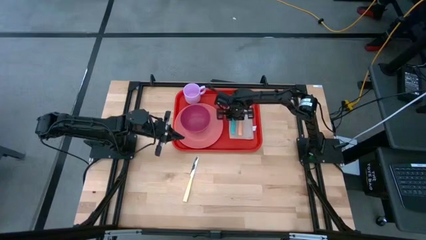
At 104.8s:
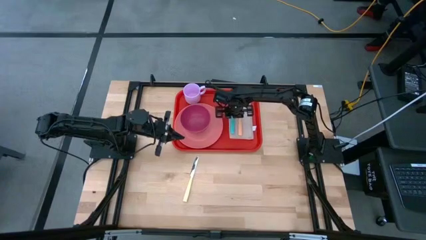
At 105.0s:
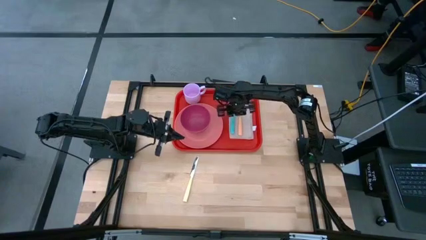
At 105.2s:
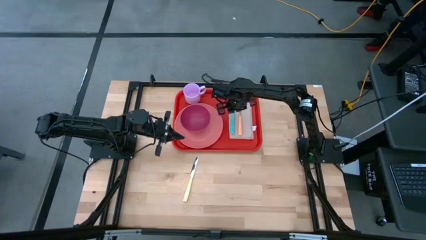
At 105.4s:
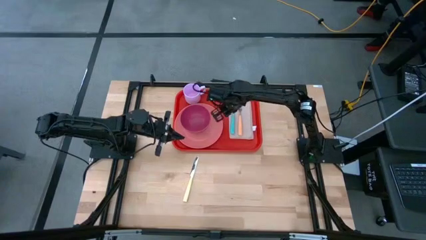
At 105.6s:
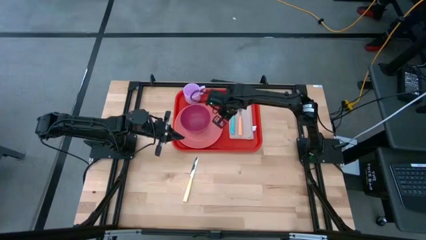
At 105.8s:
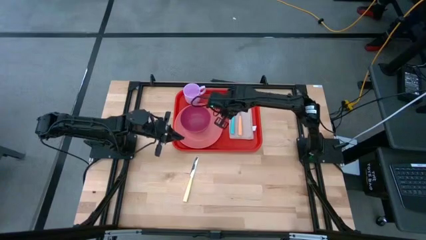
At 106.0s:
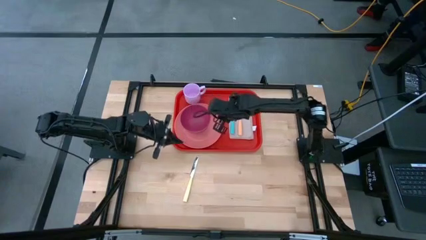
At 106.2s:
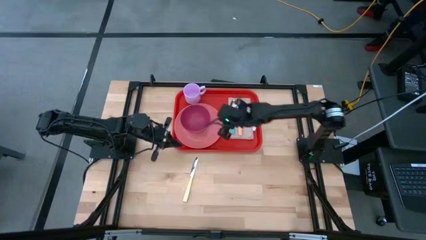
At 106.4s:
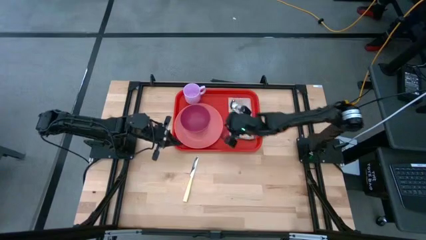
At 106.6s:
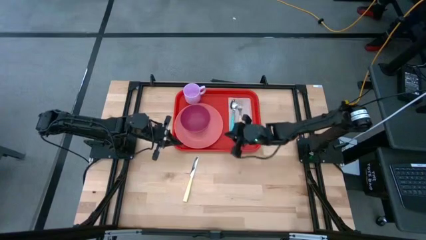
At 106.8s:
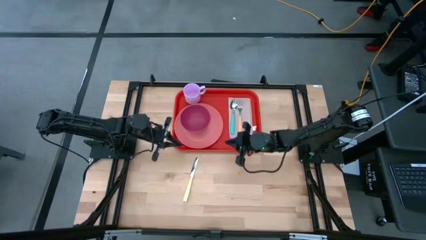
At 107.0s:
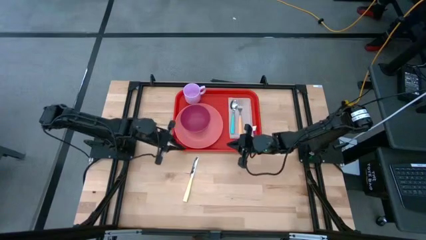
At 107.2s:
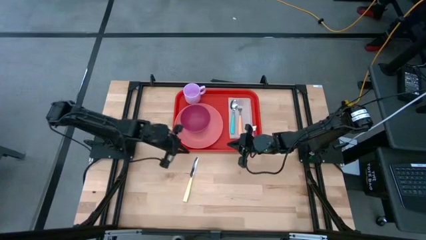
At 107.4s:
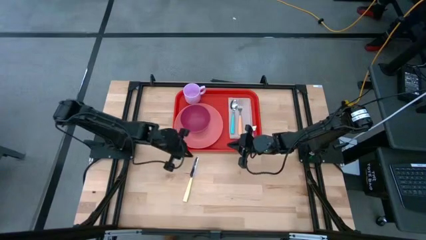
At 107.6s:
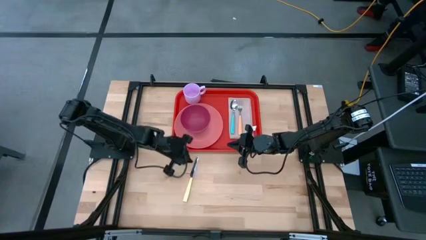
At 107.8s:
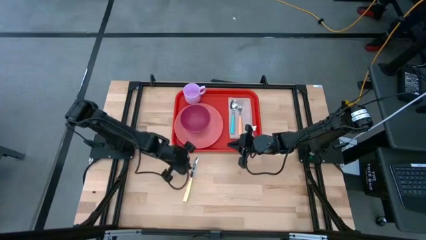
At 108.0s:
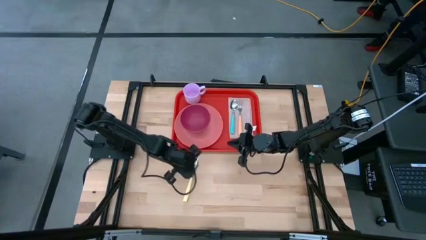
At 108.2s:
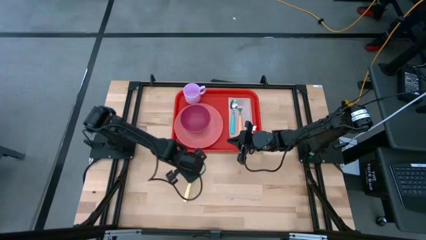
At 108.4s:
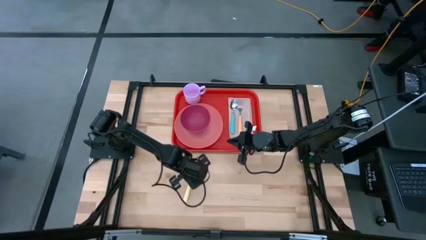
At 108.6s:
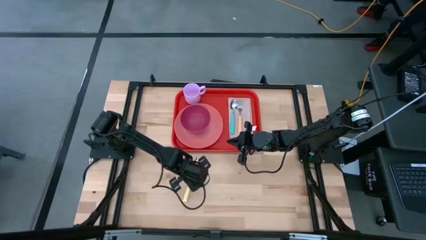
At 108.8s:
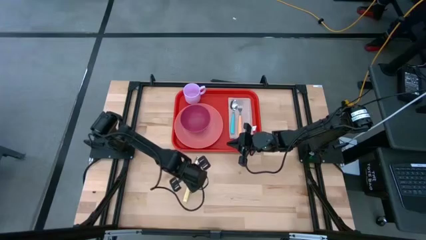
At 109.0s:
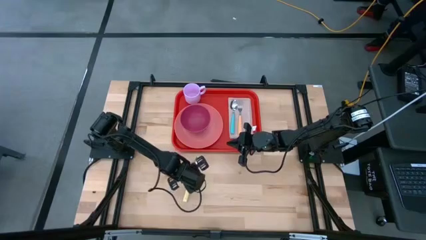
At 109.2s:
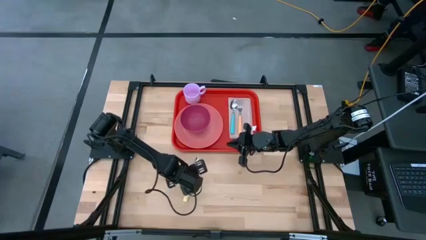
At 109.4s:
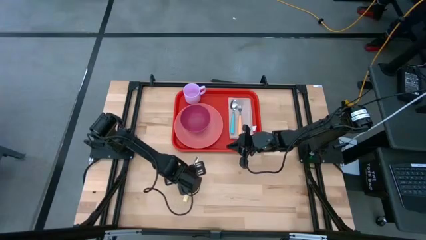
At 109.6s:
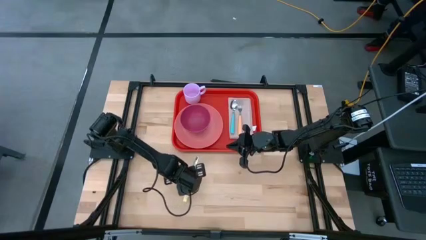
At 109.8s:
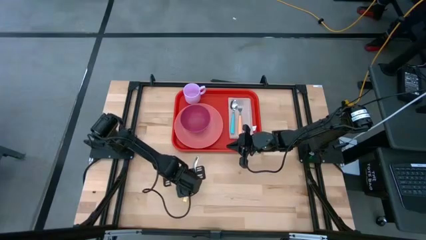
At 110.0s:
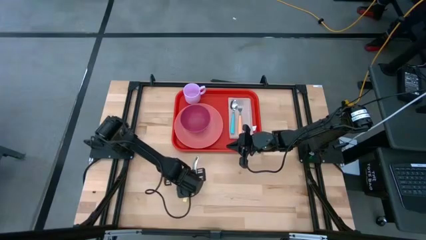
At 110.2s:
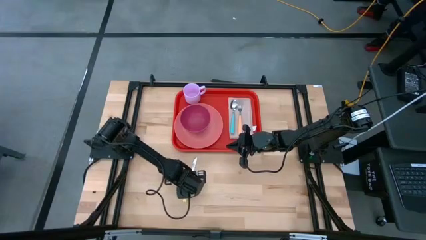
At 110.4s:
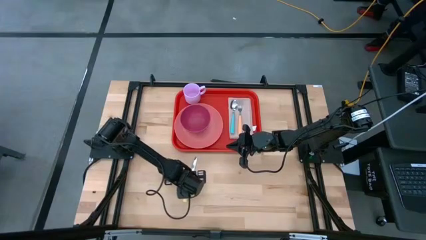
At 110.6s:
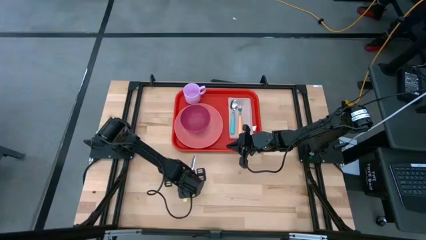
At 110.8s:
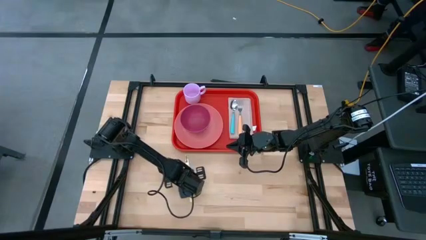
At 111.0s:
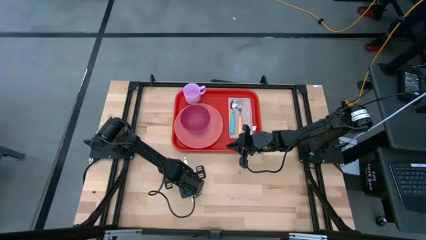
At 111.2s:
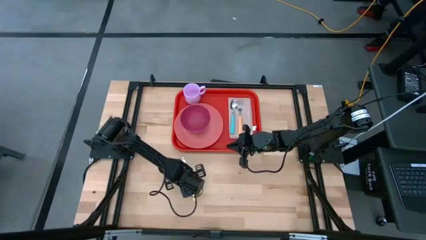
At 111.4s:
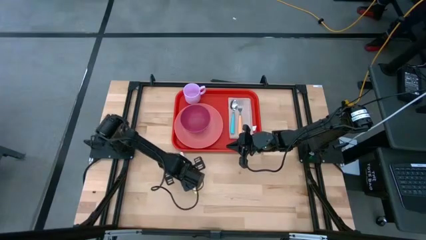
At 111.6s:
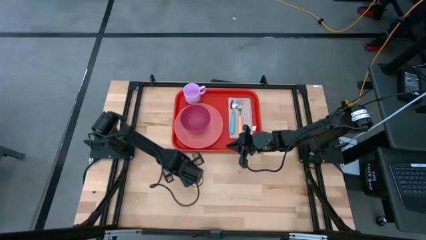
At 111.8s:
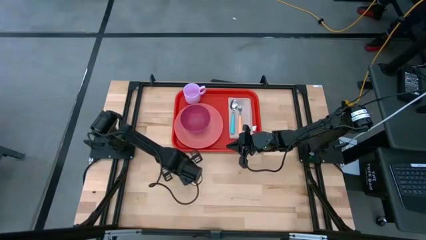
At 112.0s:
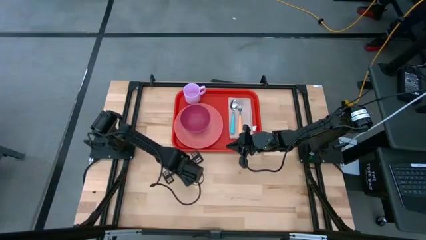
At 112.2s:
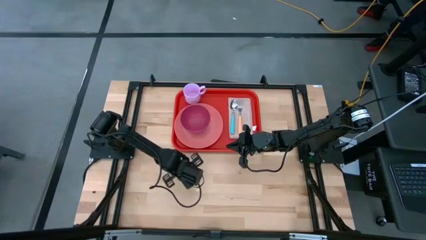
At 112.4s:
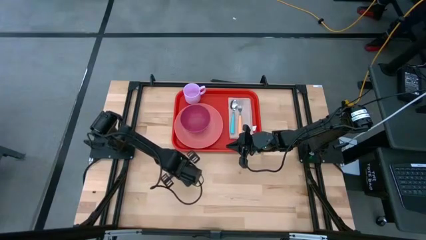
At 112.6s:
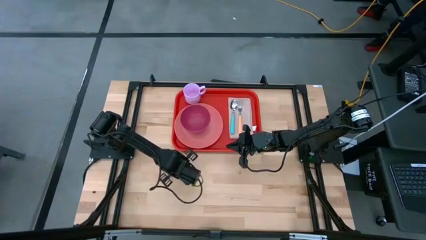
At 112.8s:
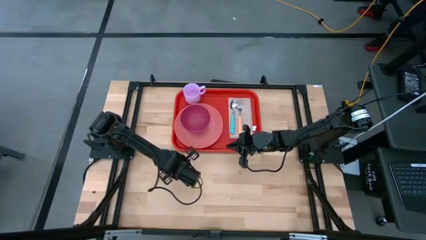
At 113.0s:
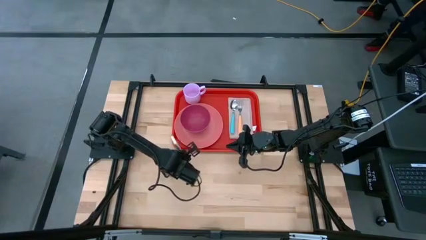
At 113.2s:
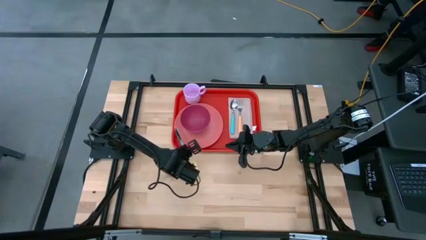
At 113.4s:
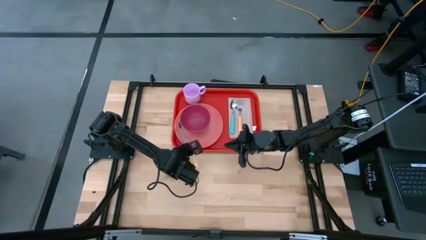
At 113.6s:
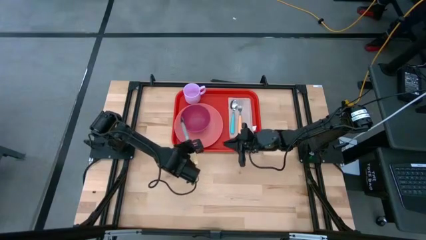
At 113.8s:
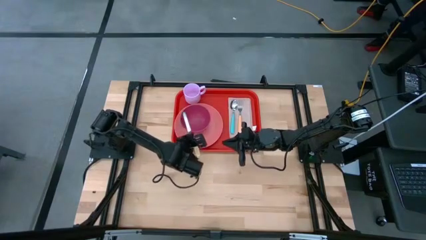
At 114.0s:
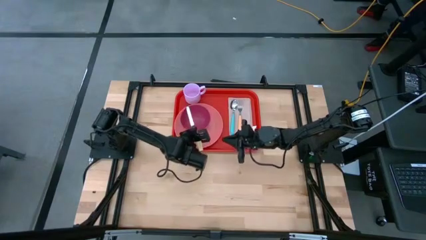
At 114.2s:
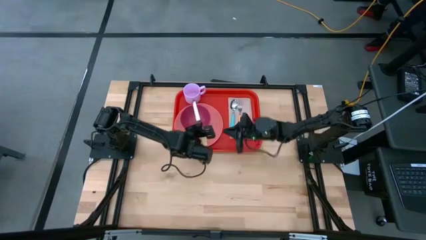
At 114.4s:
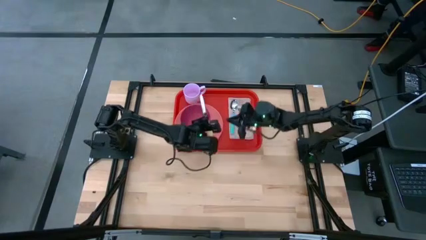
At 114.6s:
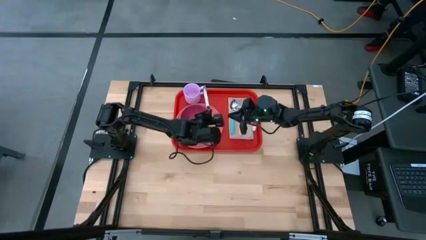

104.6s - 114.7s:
Task: Set up tray
Put the yellow knife on the brown napkin to the right of the orange fork

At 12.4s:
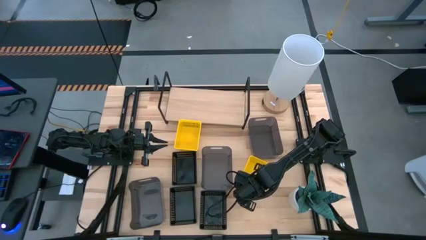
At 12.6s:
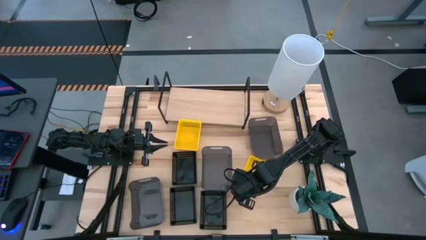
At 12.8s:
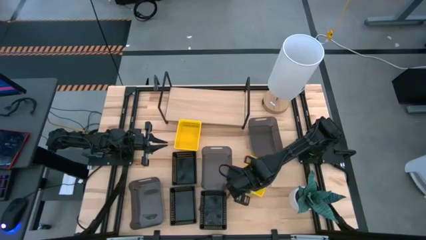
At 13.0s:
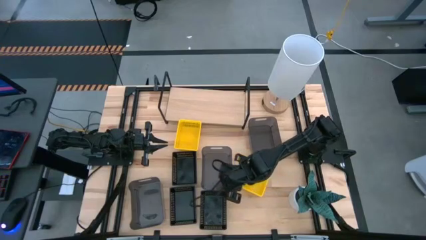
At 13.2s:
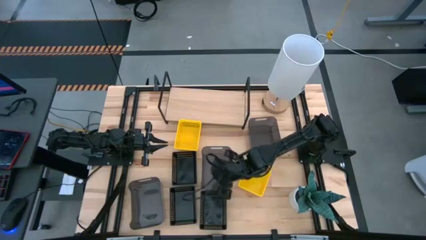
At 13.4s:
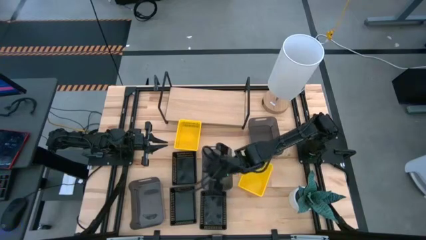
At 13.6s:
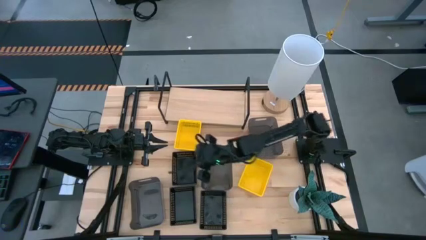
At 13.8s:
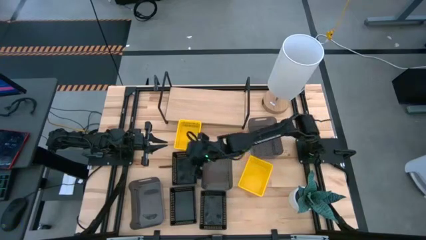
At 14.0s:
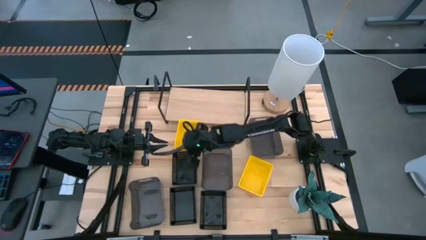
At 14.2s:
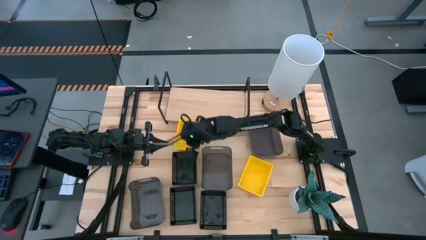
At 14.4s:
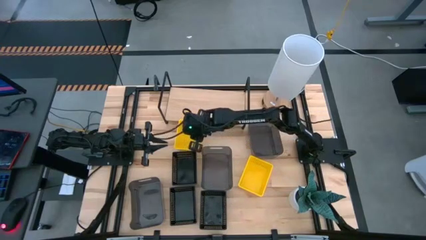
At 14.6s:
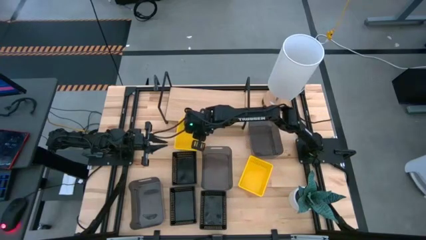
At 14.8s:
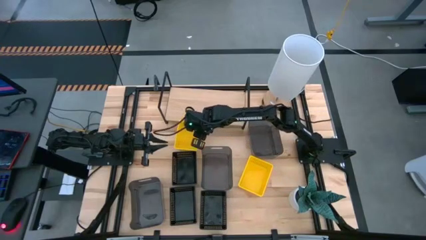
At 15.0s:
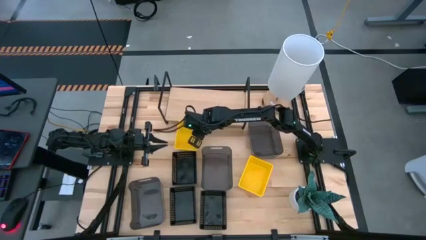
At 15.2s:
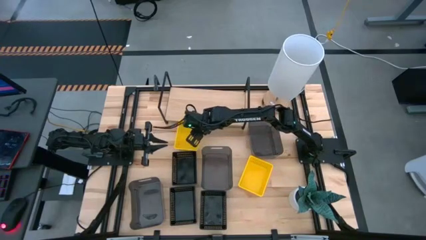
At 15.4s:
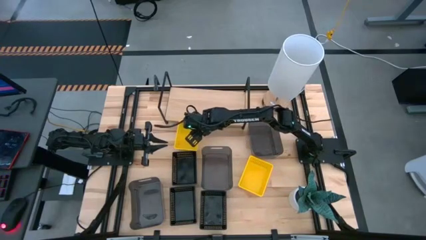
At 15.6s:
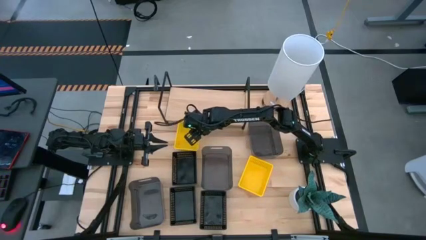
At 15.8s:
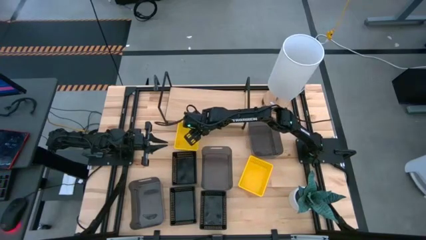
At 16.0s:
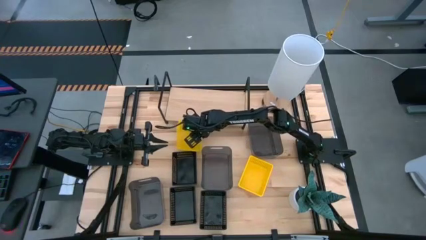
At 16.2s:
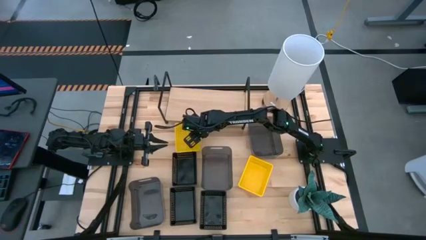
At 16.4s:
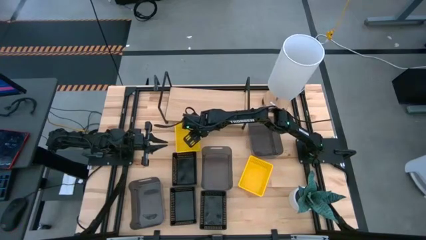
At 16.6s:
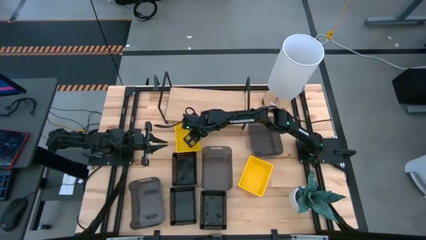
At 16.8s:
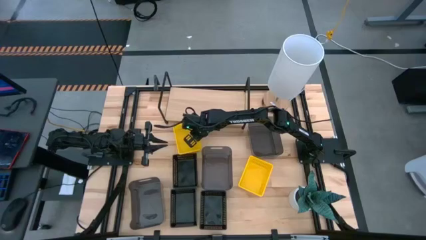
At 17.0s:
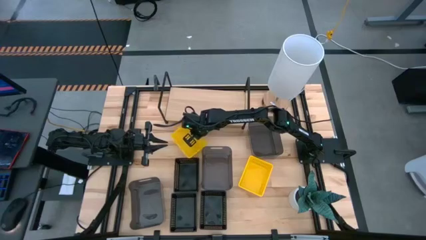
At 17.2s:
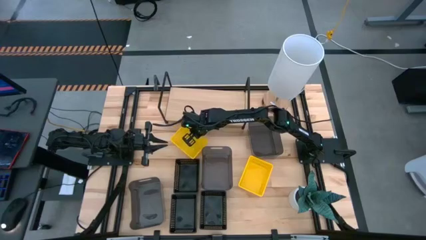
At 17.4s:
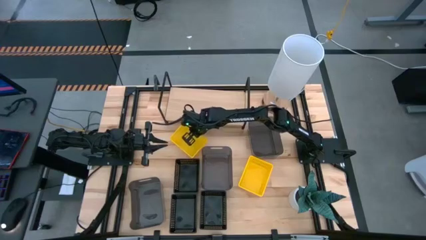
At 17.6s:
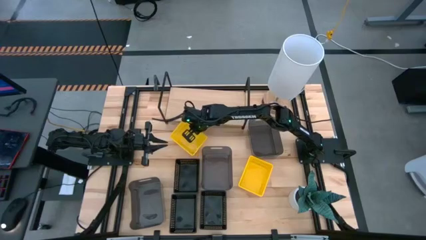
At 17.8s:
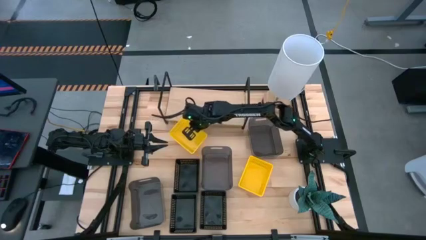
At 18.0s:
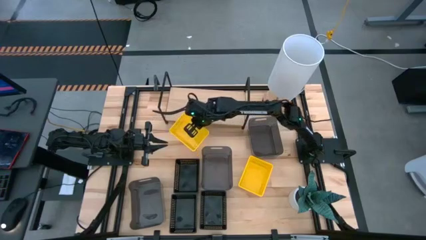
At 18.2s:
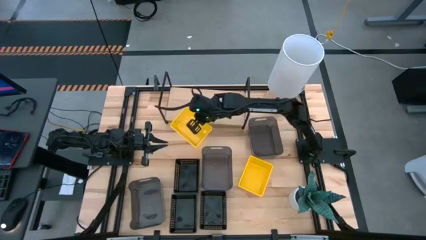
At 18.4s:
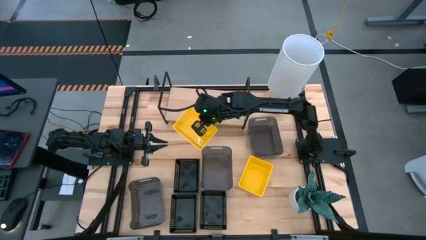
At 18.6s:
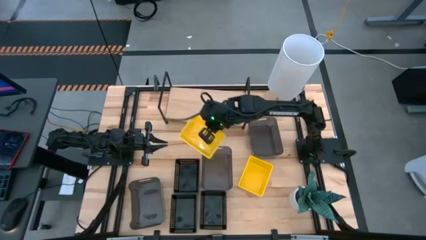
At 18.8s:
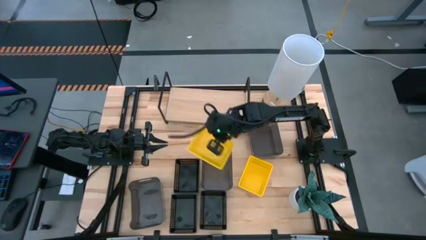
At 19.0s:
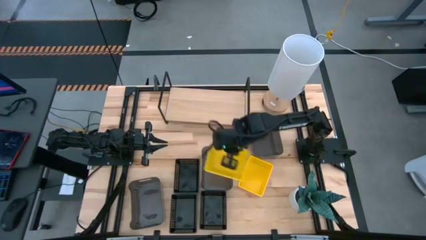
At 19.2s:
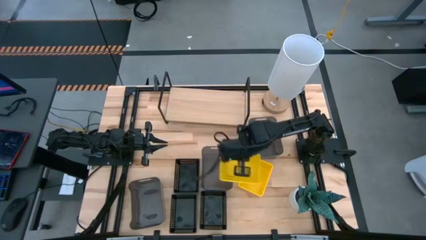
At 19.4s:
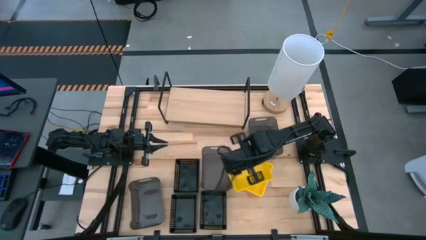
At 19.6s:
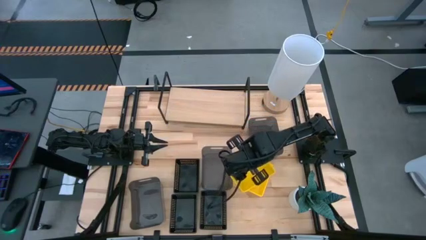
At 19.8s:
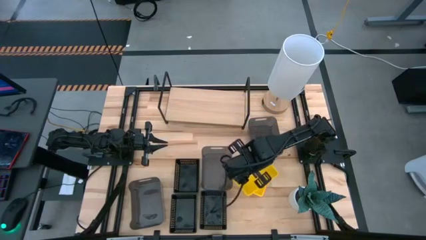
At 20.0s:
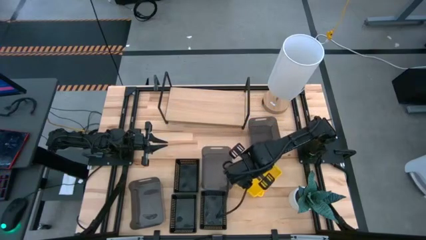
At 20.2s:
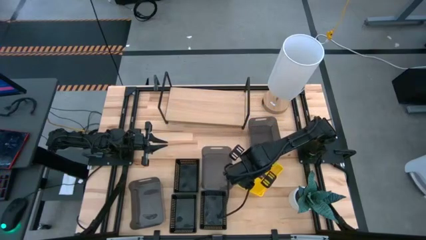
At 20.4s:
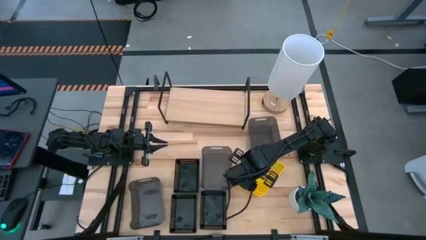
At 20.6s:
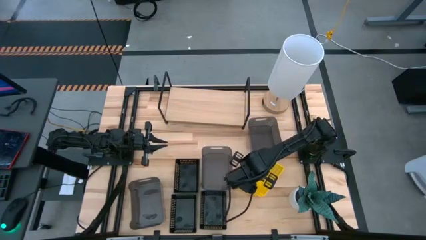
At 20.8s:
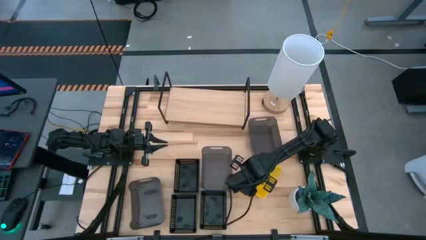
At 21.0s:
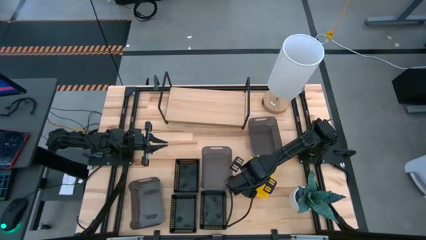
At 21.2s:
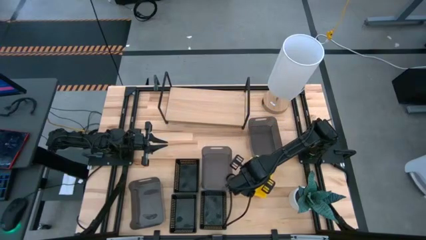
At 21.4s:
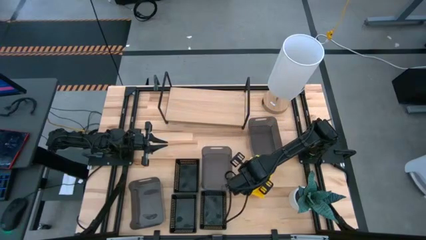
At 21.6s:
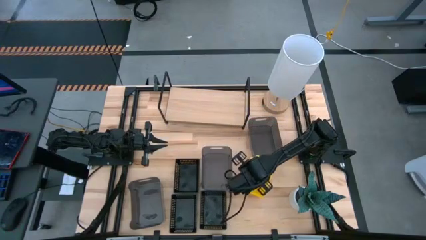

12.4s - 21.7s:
Task: Stack baskets on shelf by color
Stack the top yellow bin on top of the other stacked yellow bins
